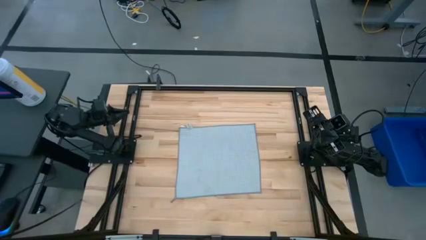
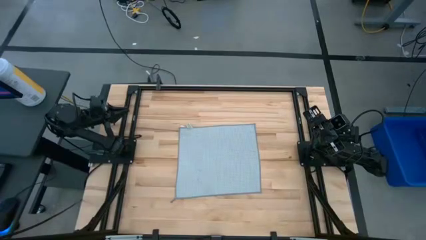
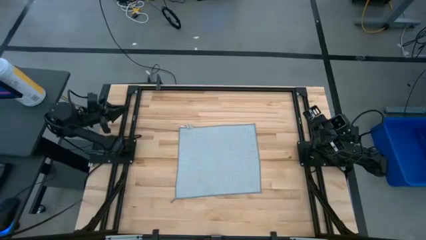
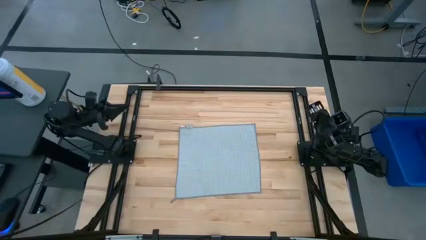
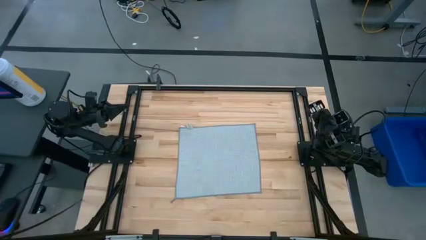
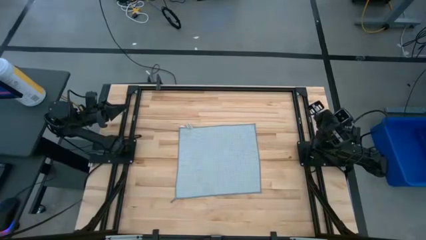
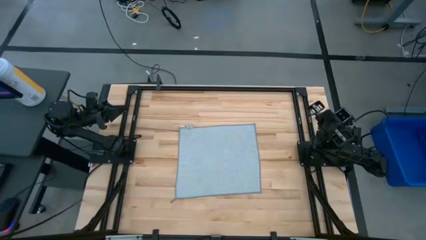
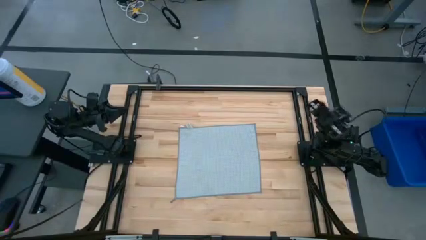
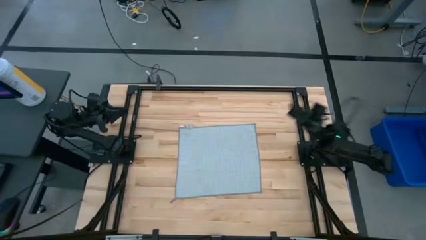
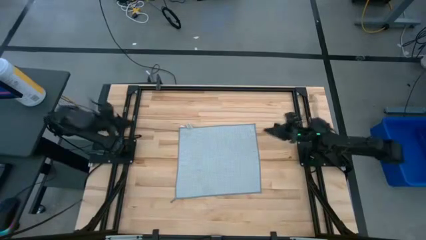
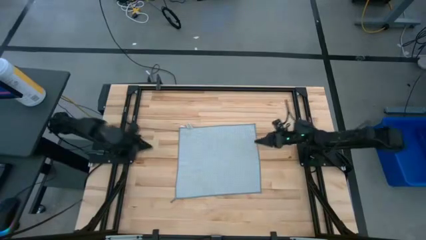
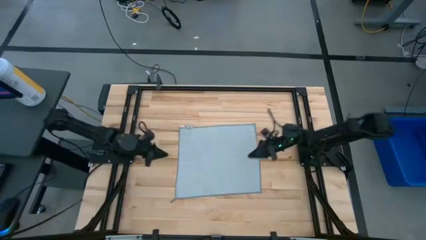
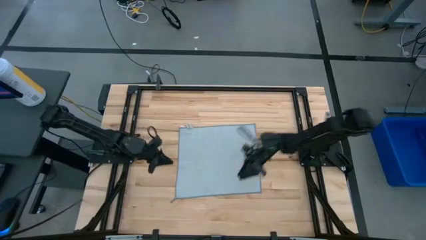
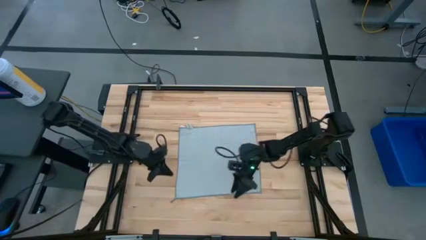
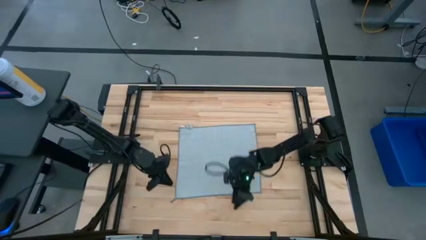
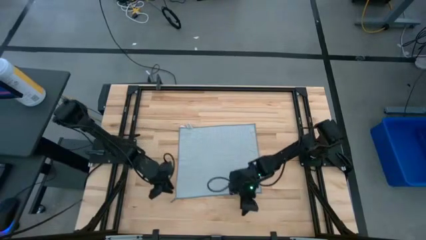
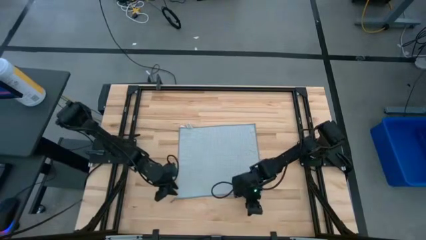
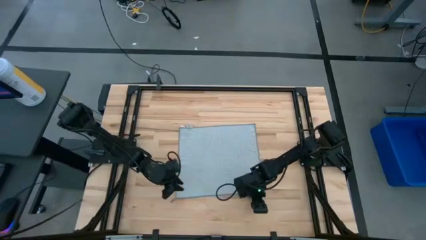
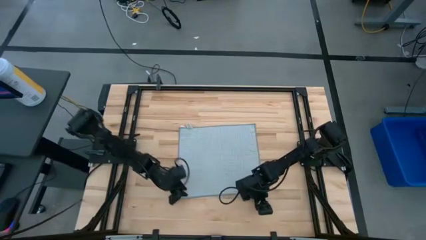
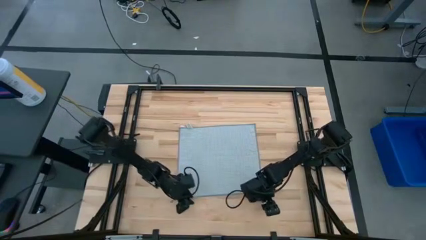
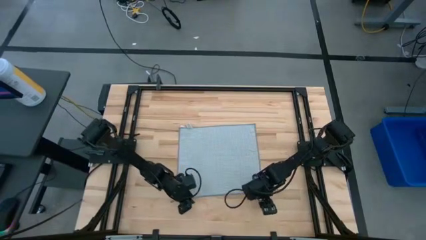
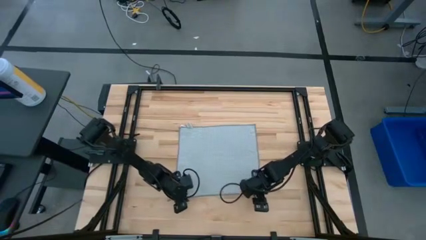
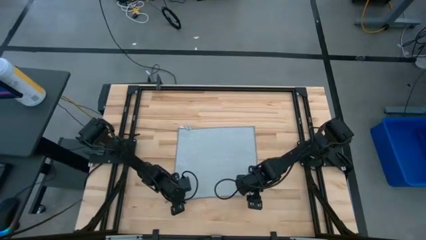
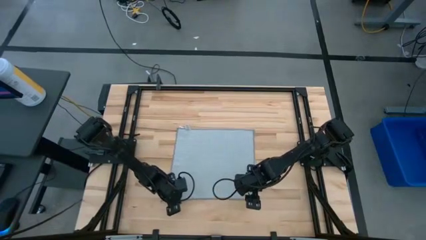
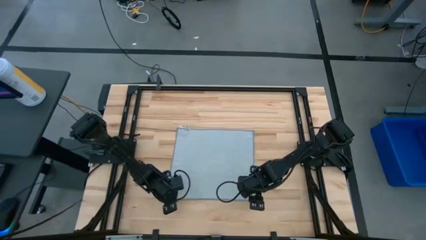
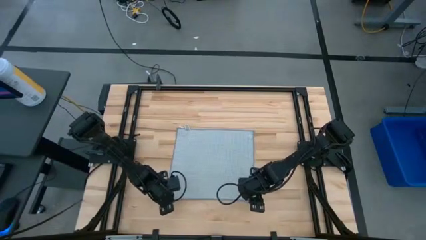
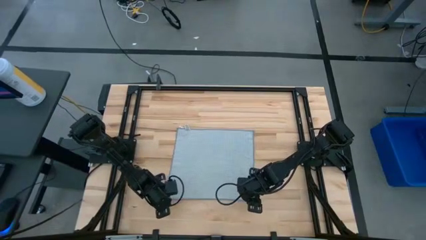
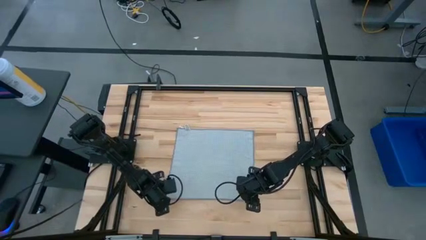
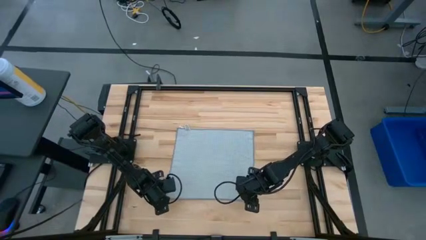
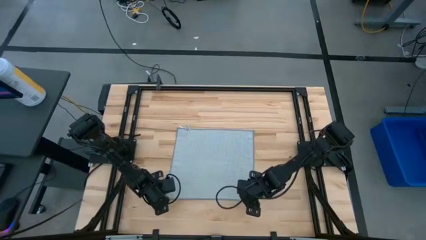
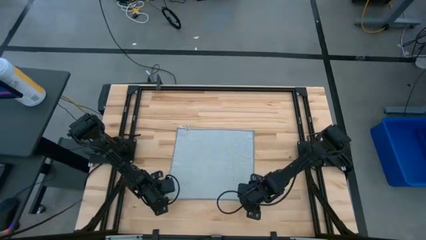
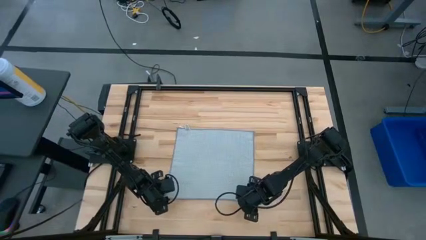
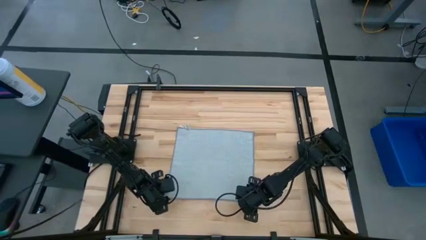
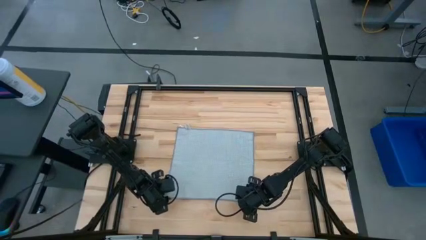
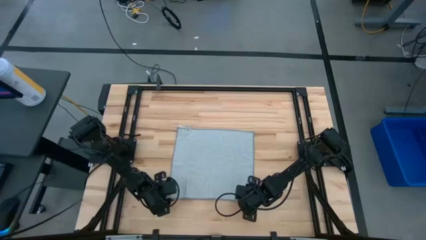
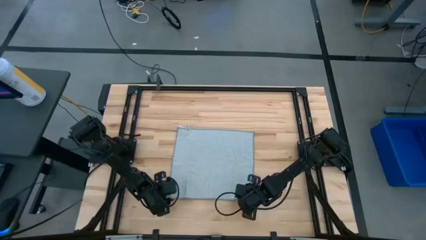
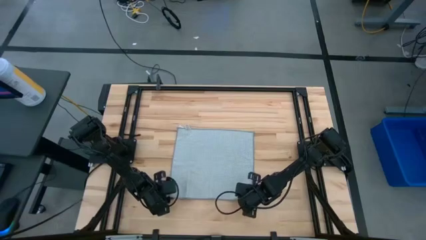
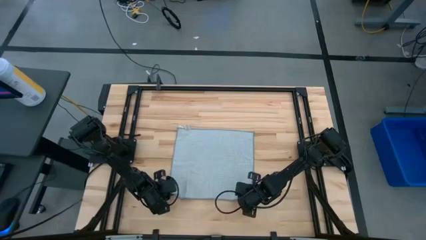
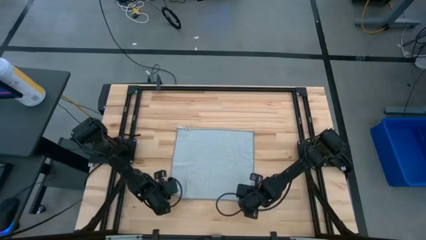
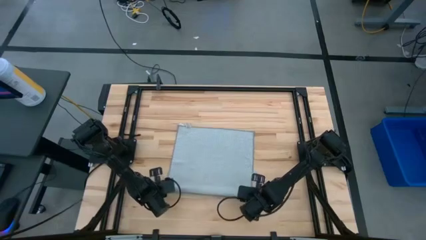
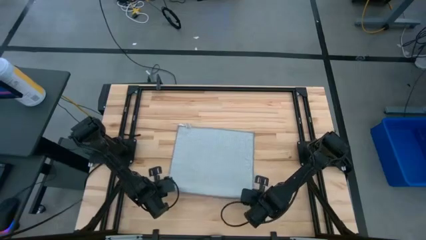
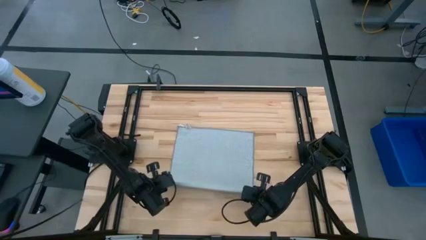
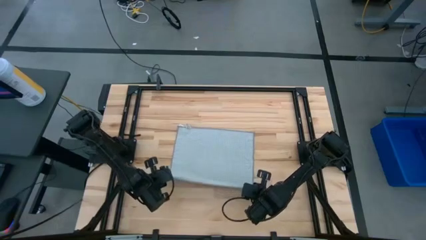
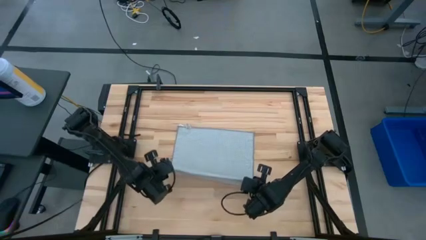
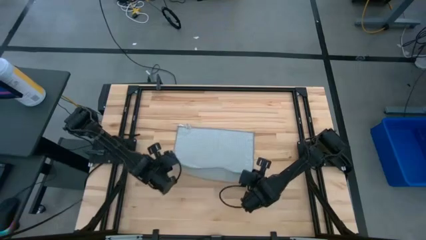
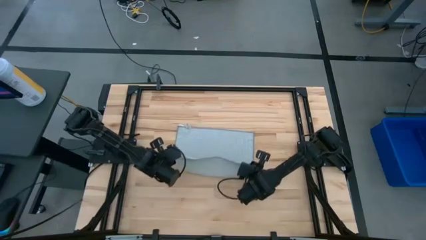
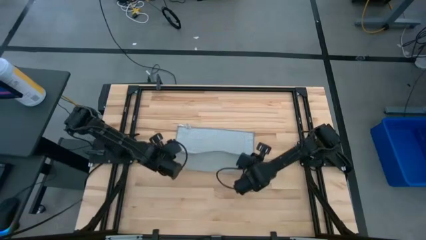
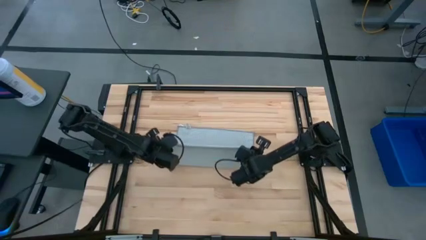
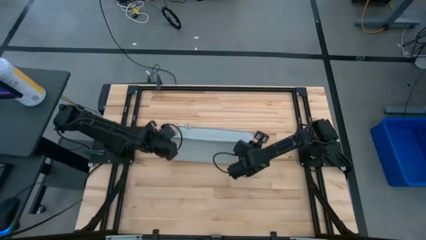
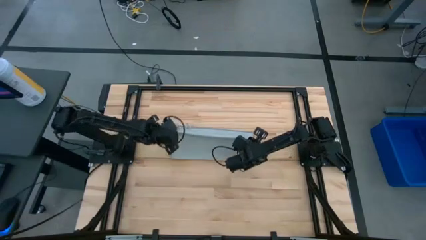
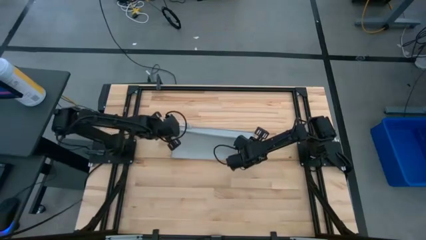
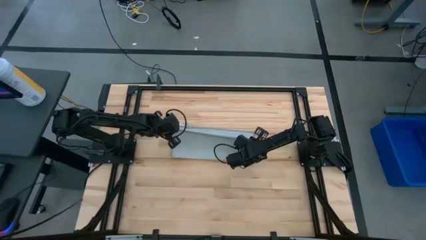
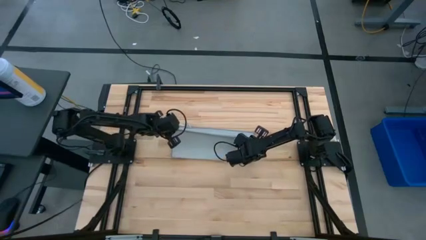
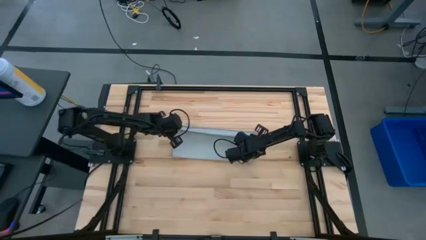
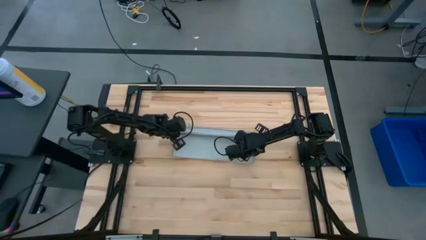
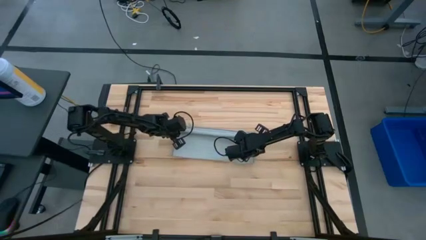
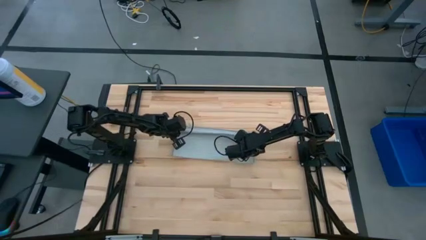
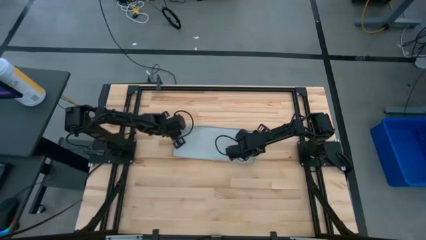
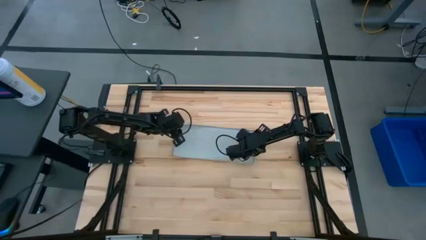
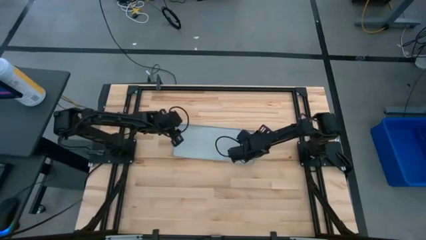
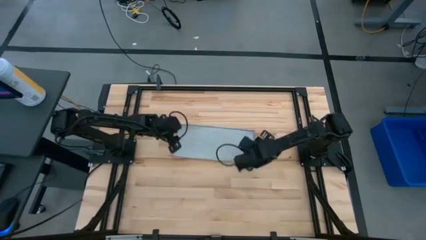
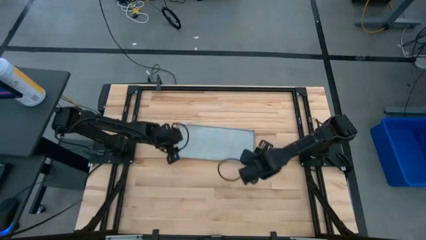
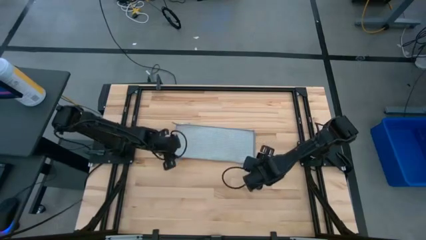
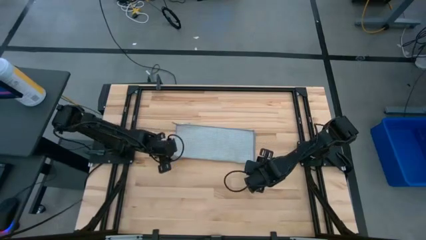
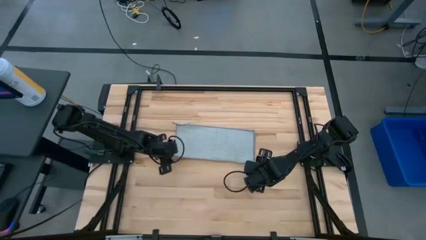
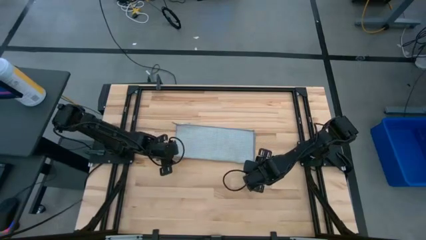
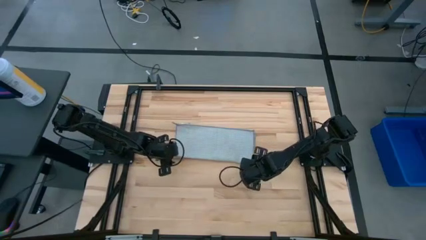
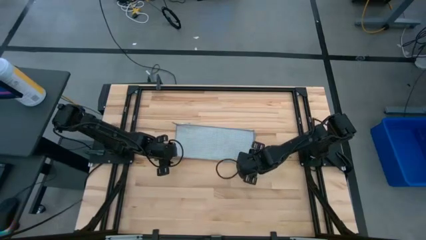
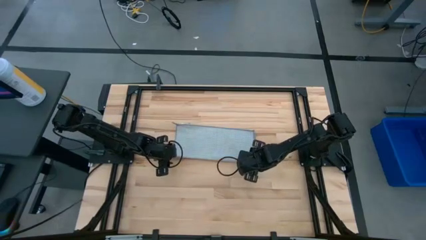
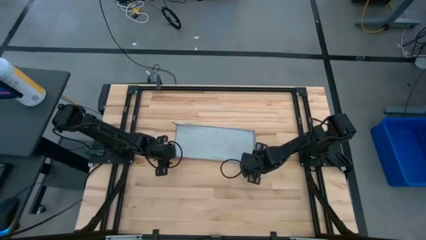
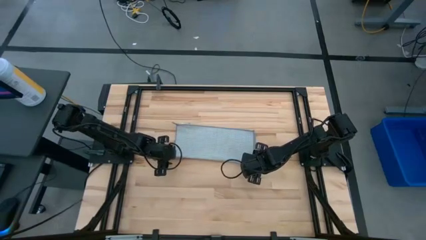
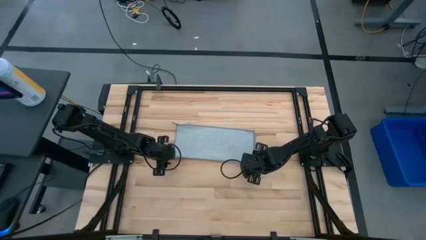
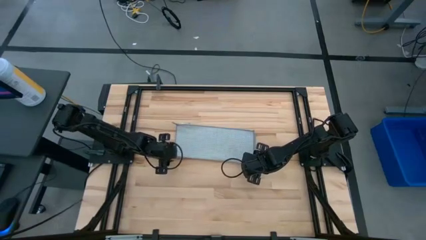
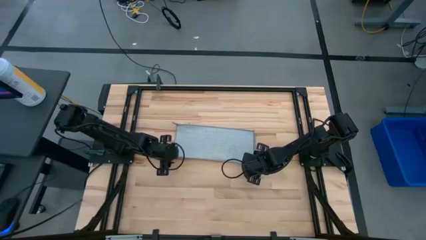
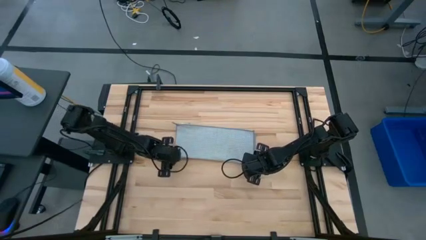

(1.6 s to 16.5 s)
Task: Fold microfiber towels
Fold the gray microfiber cloth
